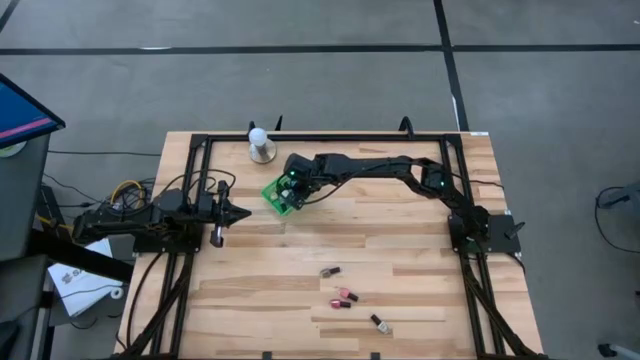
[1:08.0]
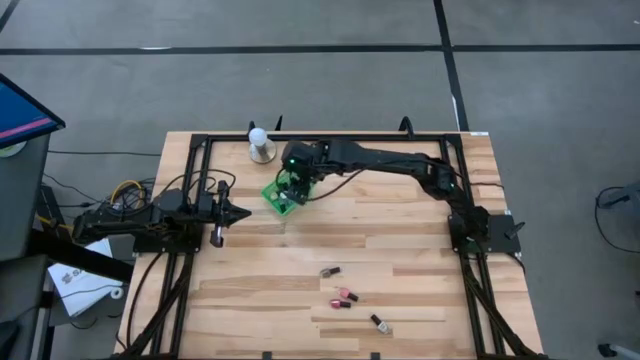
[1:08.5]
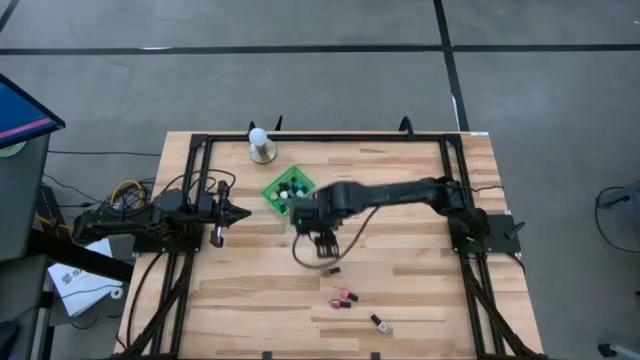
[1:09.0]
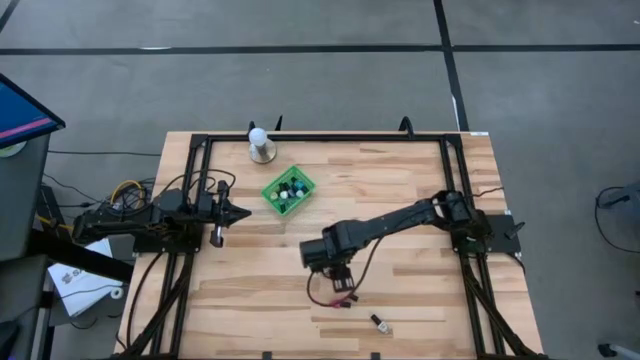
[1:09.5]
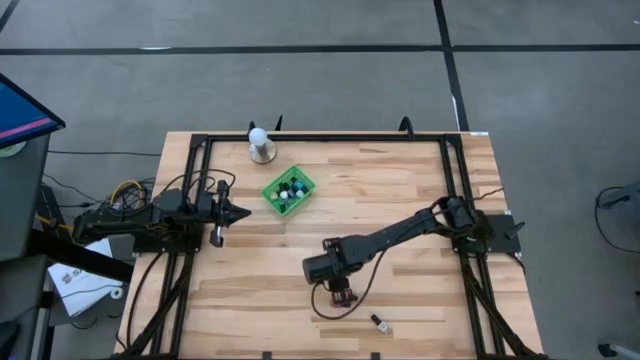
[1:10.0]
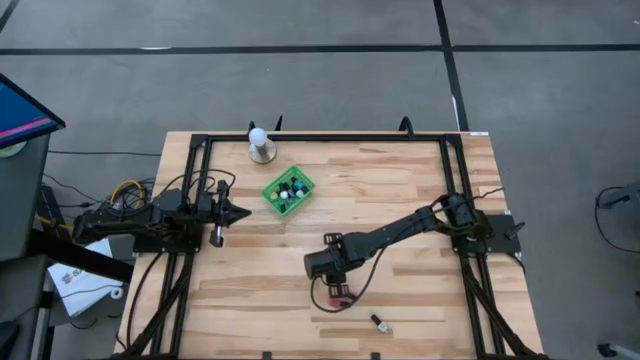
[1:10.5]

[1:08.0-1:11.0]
Task: Pick & Place Nail Polish
Put the brown nail polish bottle into the green bin

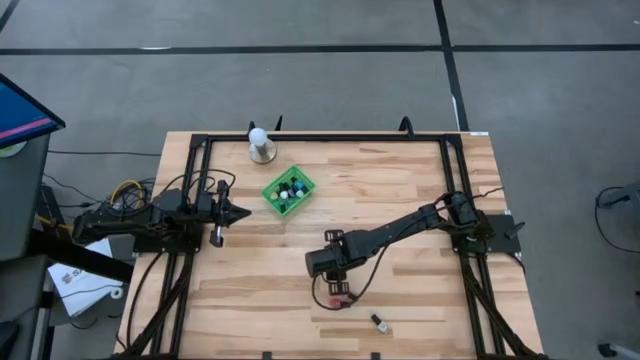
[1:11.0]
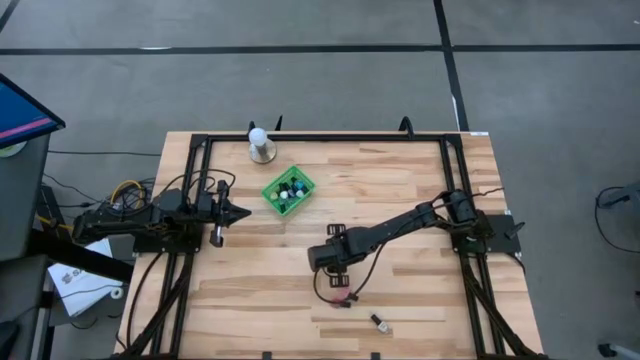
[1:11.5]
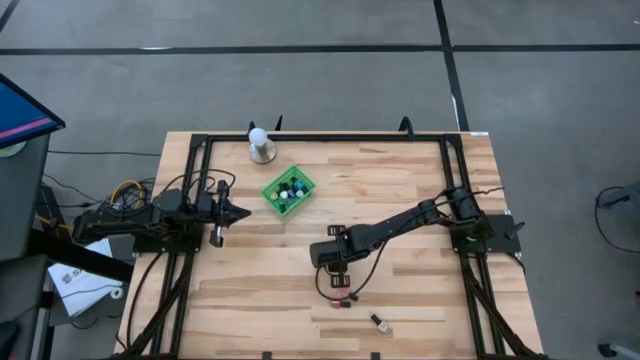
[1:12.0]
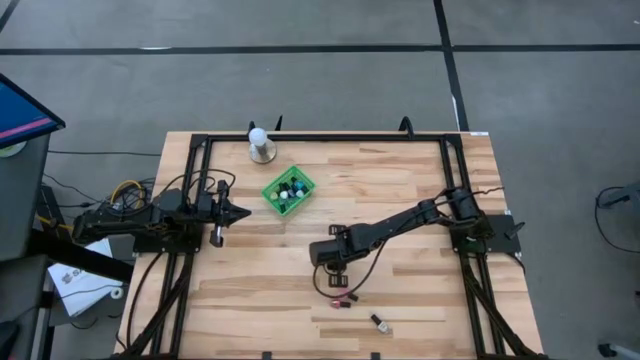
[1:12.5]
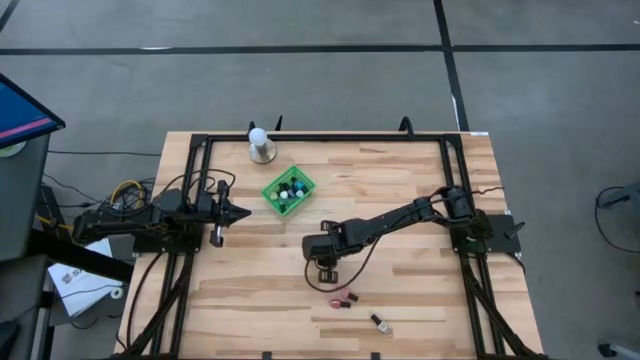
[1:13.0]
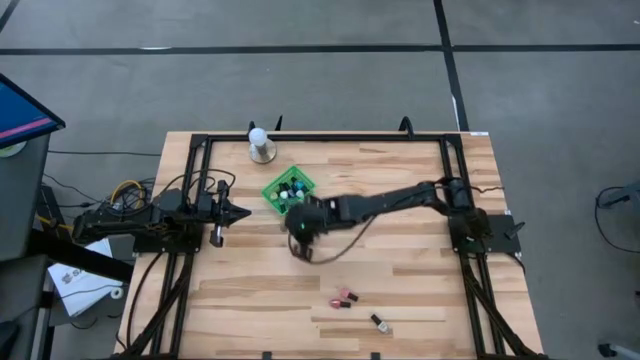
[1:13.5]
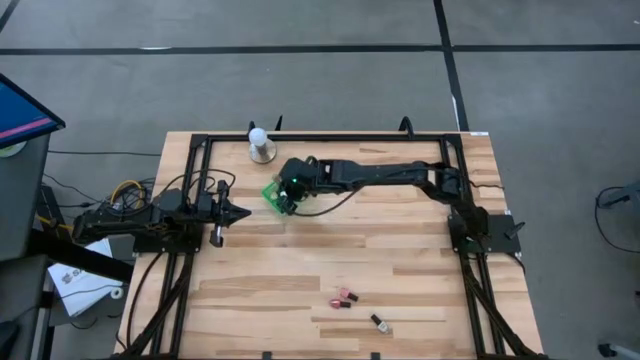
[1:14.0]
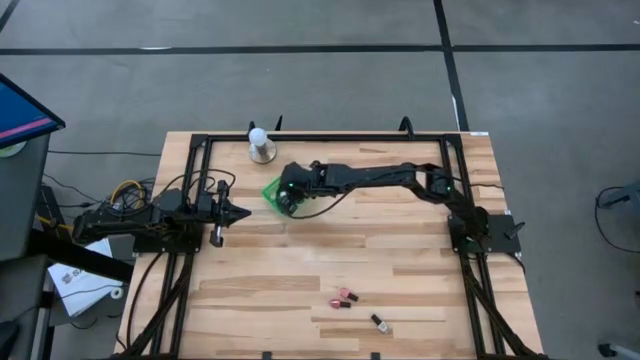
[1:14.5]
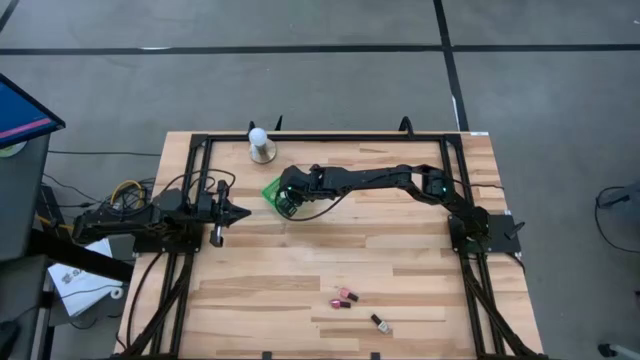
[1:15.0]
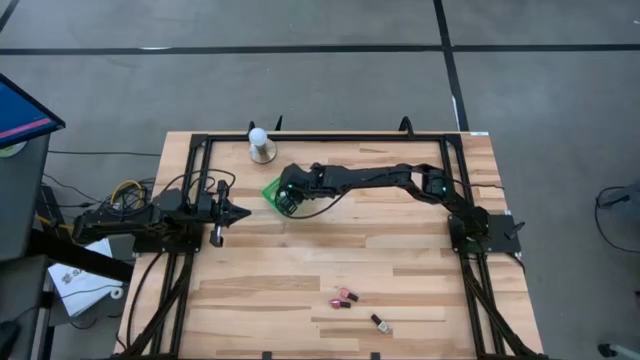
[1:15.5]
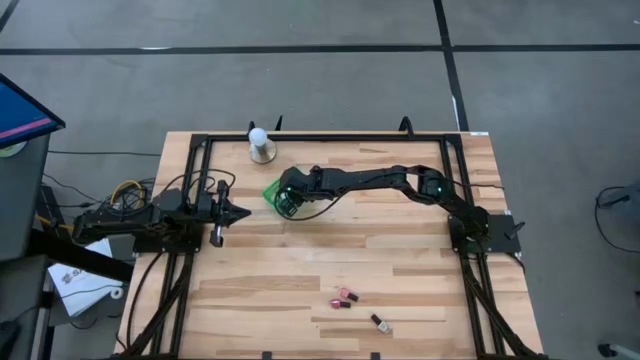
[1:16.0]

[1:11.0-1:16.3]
Put the brown nail polish bottle into the green bin

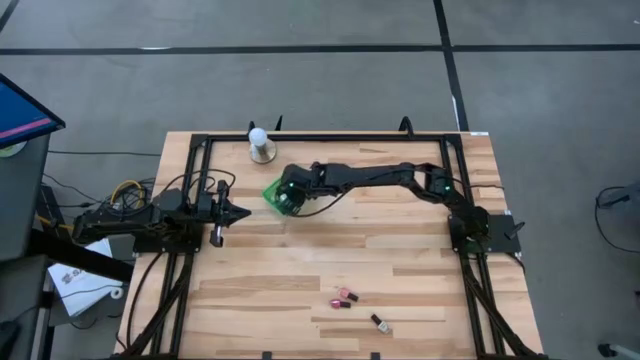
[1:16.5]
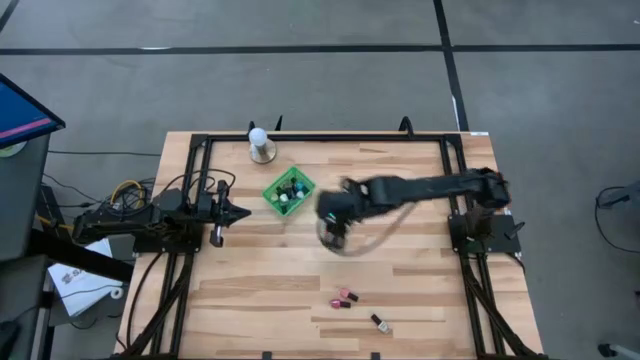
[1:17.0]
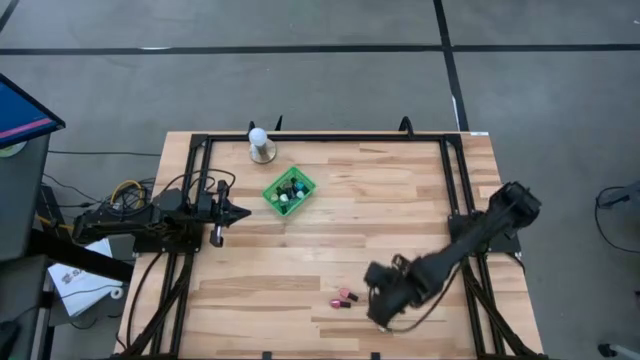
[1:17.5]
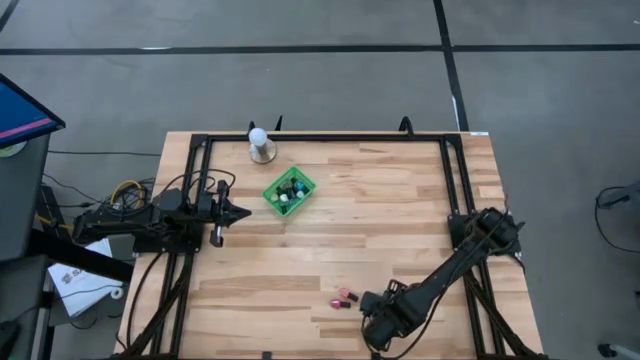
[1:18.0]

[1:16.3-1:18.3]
Put the white nail polish bottle into the green bin

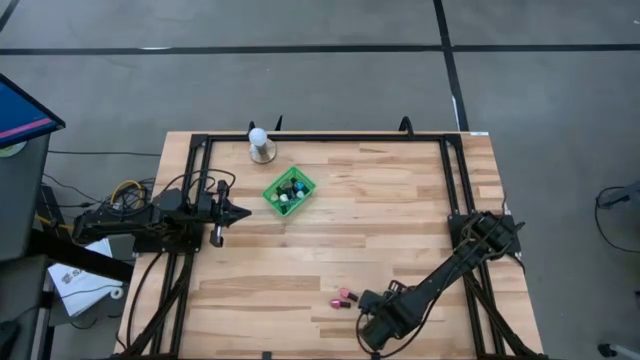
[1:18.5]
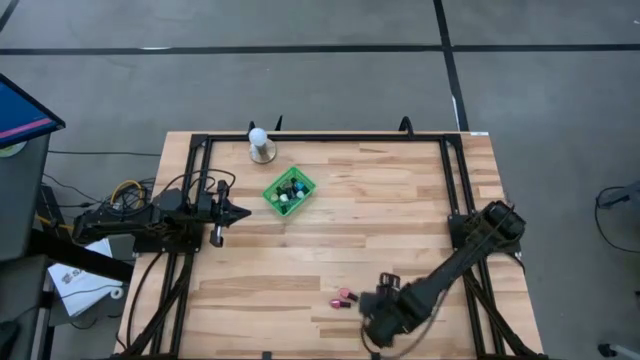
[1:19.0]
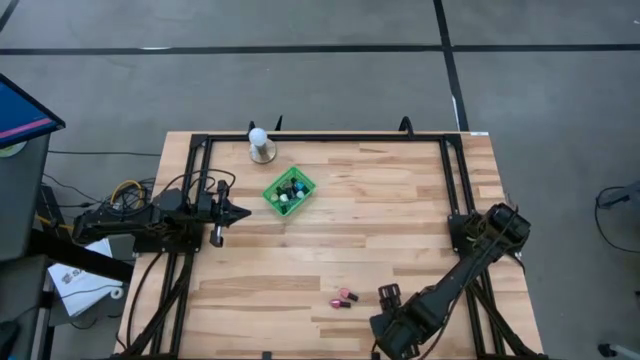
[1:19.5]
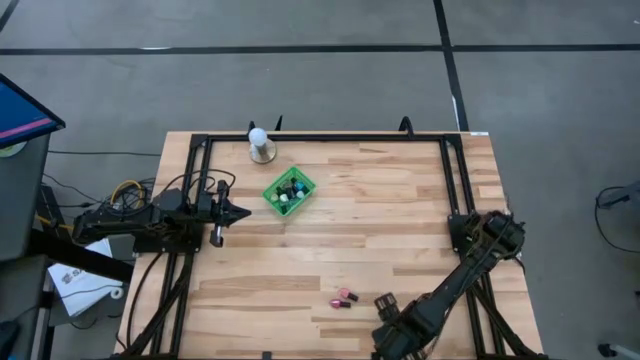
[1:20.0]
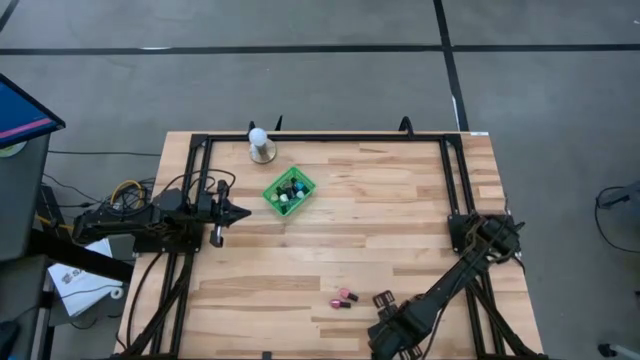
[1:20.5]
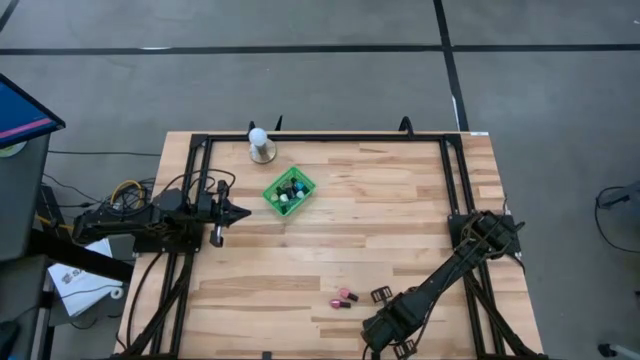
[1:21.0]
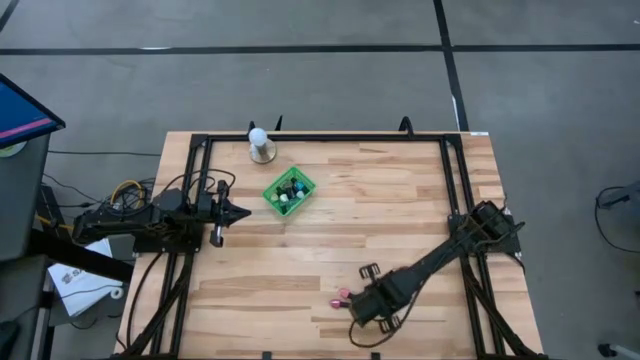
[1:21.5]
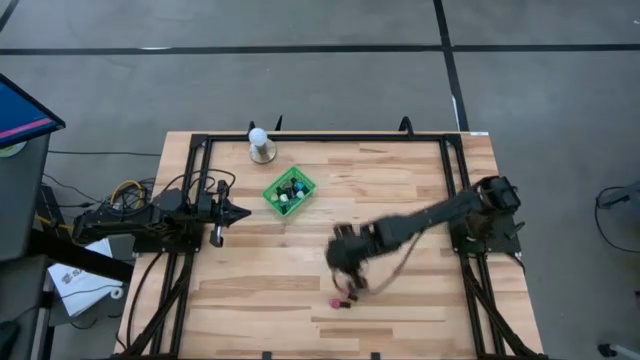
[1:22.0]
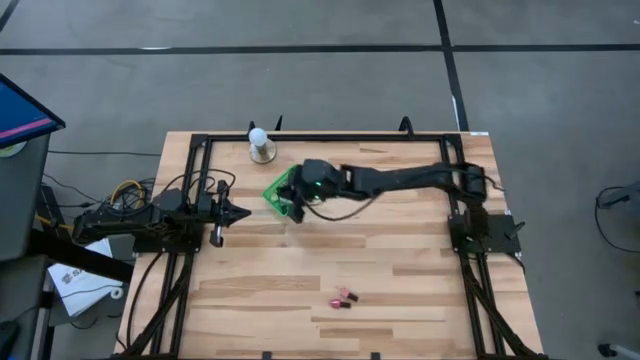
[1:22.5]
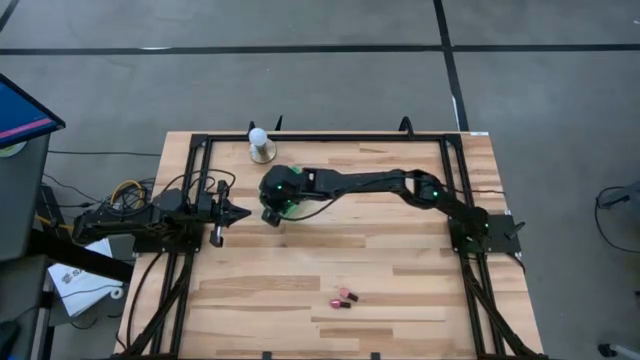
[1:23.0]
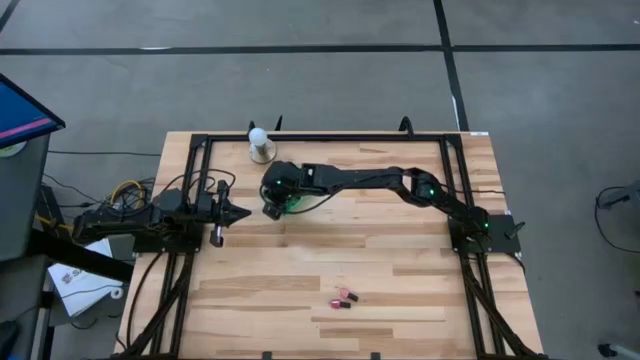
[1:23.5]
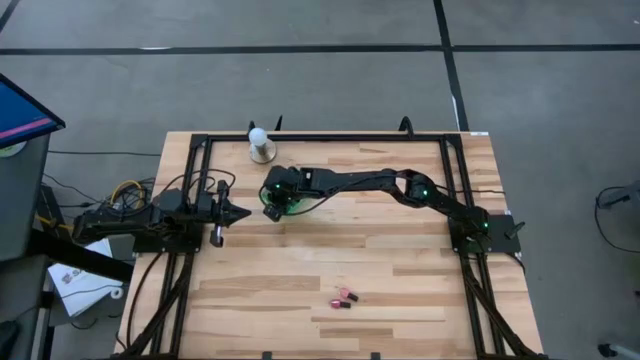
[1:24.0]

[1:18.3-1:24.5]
Put the white nail polish bottle into the green bin

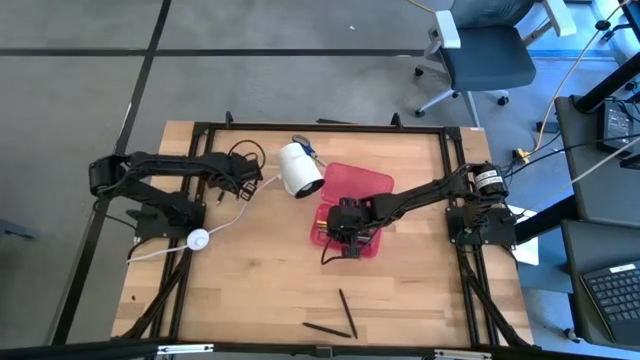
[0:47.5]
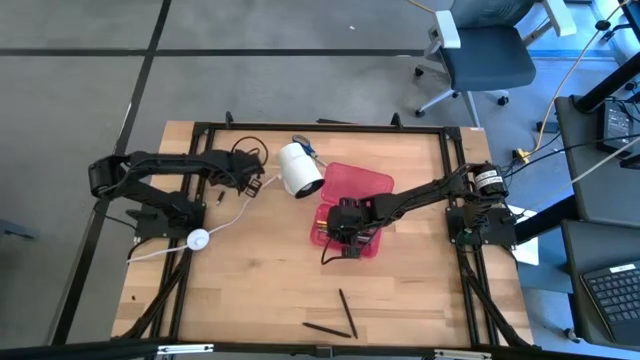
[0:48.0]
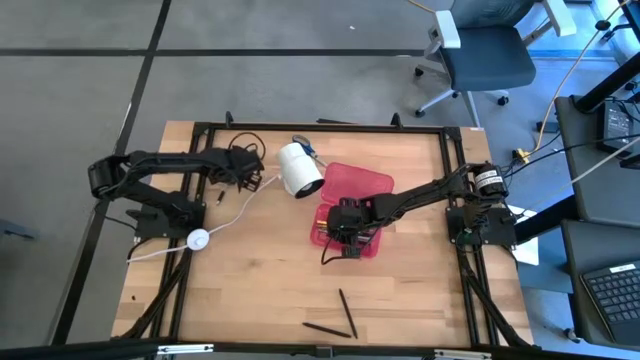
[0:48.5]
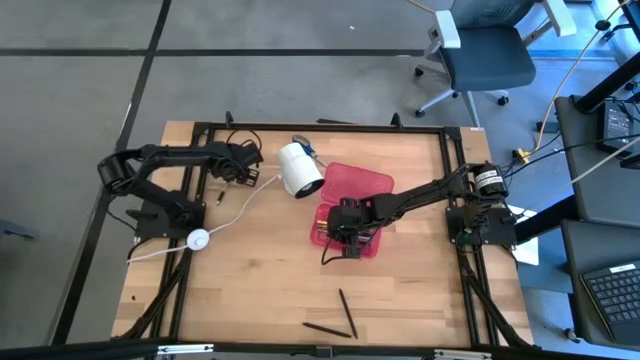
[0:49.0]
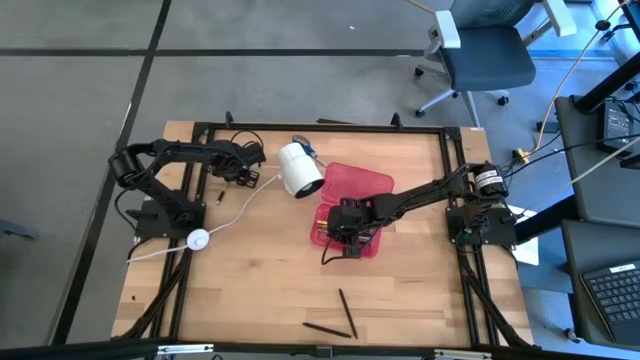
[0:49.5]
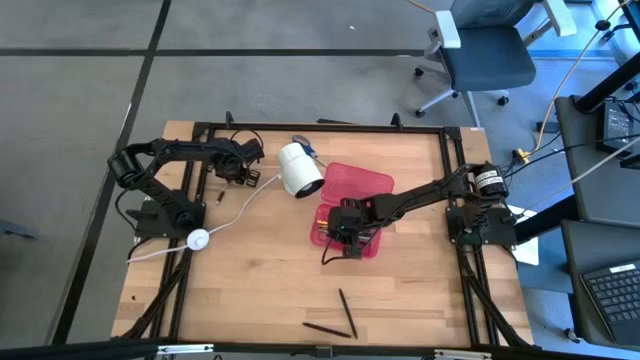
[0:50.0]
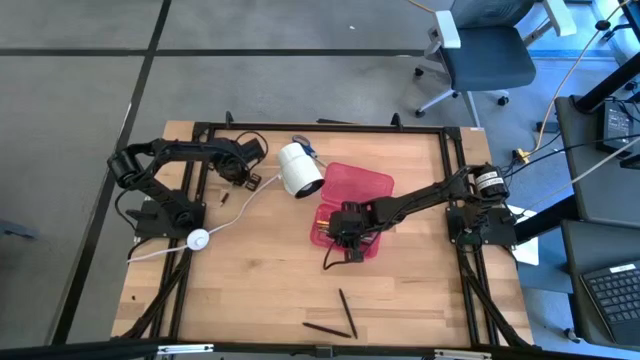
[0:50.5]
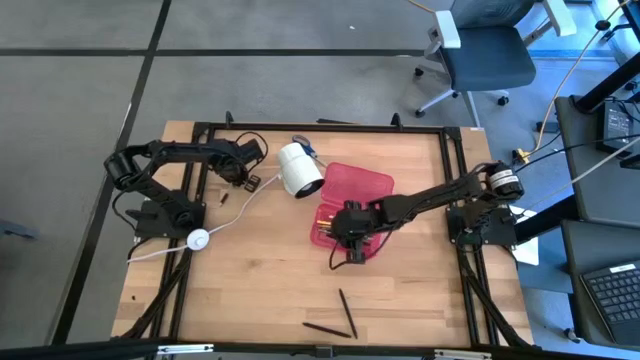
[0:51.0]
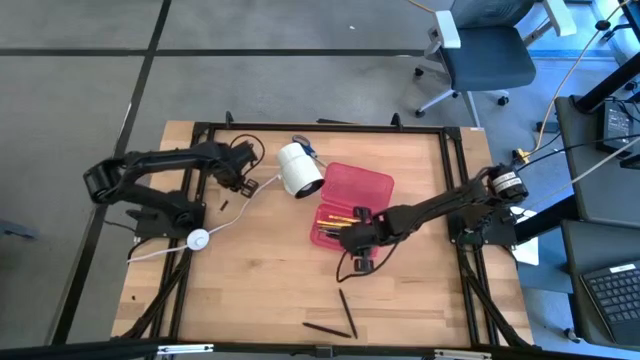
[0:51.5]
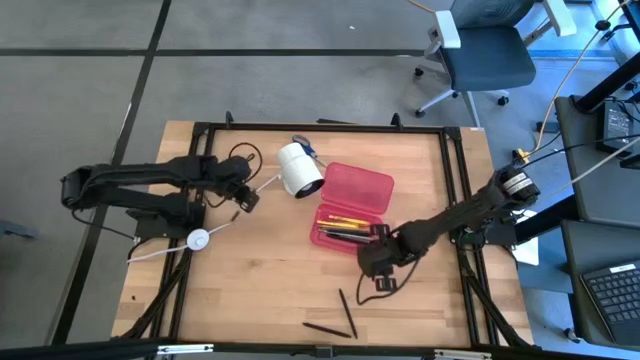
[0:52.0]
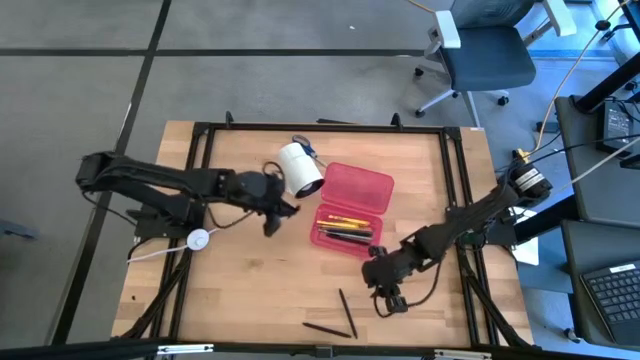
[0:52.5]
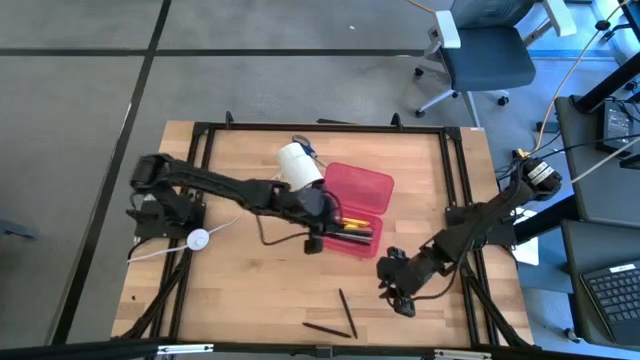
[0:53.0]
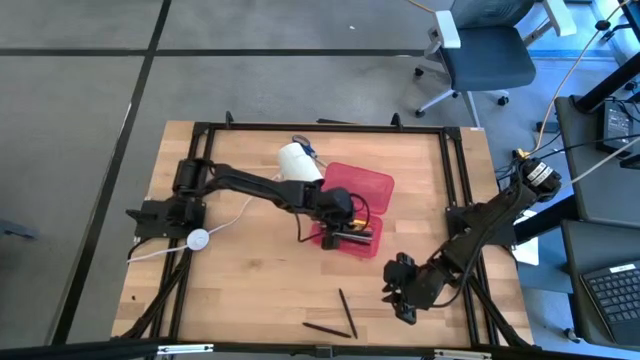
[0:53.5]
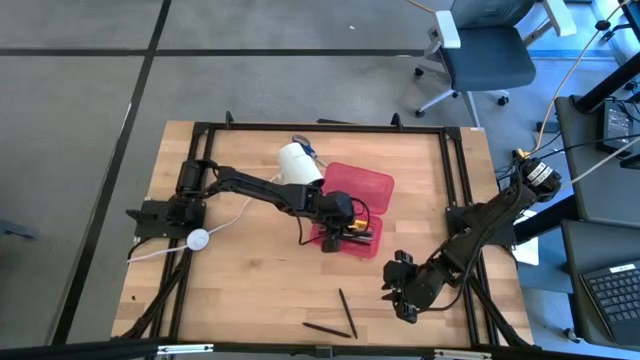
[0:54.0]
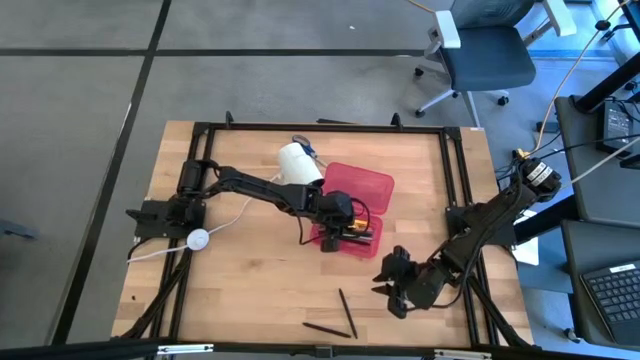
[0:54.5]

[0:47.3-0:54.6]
Task: Pick & place school supplies into a supply box
Put the transparent pen into the pink supply box
